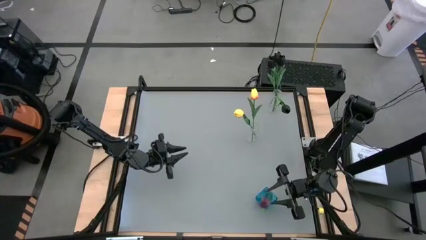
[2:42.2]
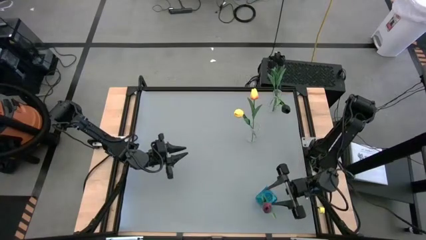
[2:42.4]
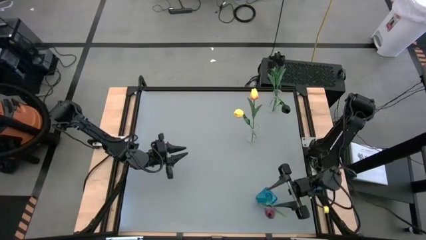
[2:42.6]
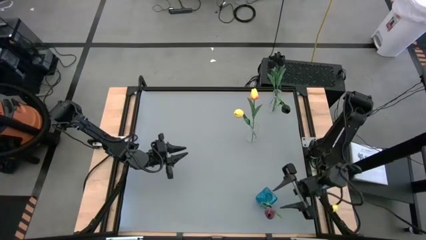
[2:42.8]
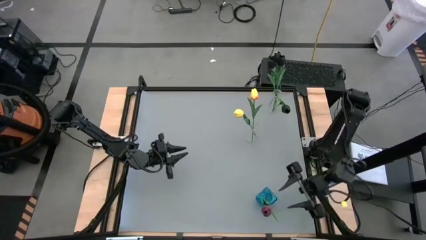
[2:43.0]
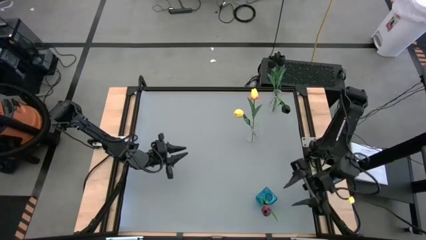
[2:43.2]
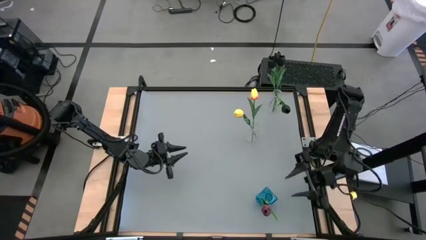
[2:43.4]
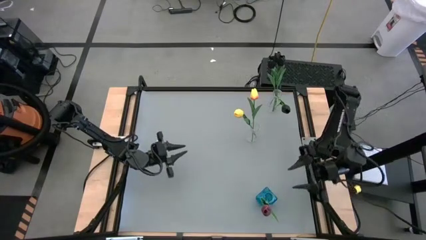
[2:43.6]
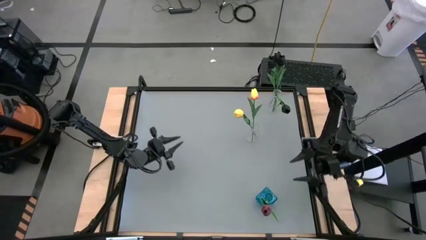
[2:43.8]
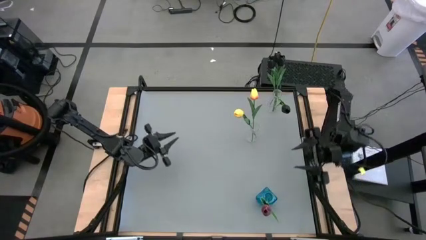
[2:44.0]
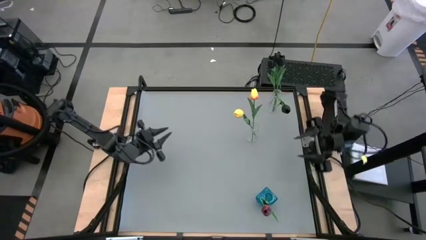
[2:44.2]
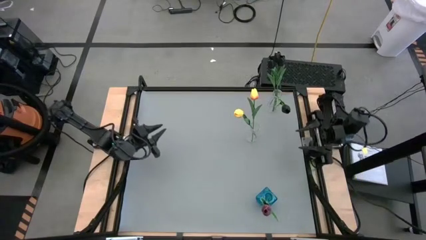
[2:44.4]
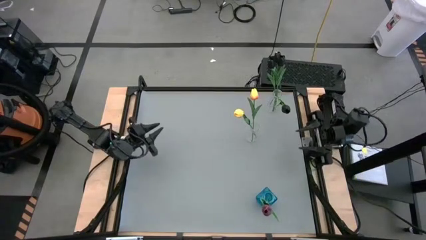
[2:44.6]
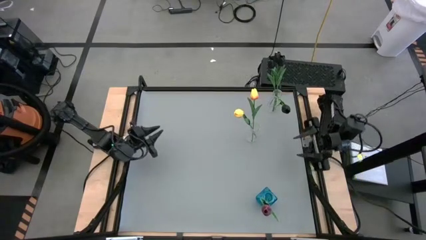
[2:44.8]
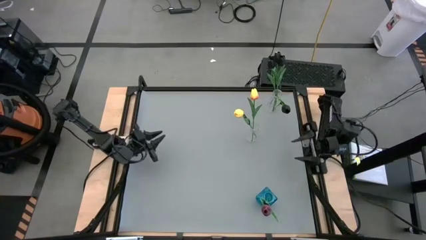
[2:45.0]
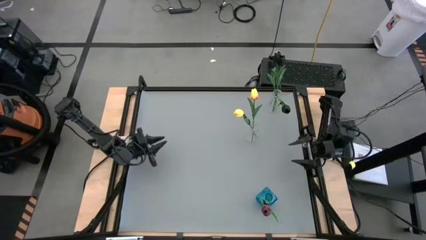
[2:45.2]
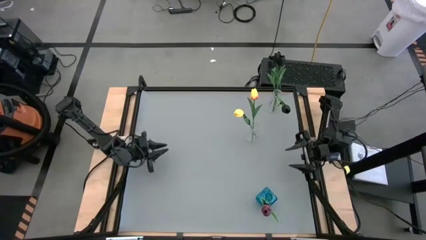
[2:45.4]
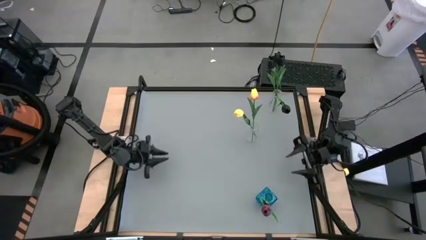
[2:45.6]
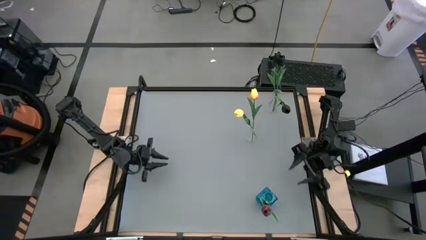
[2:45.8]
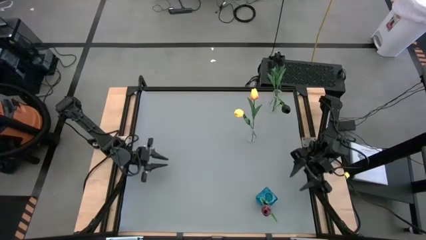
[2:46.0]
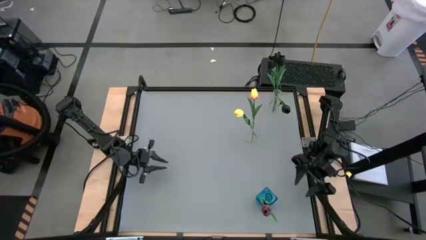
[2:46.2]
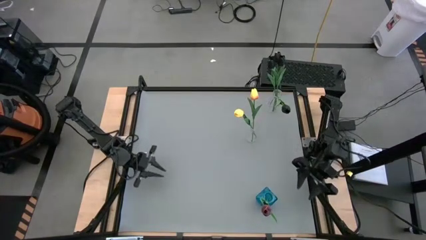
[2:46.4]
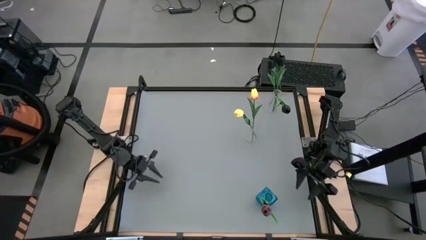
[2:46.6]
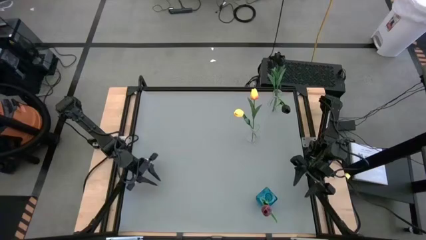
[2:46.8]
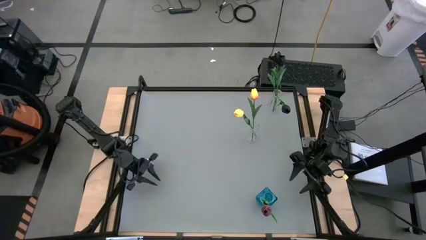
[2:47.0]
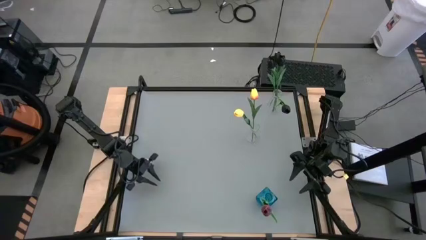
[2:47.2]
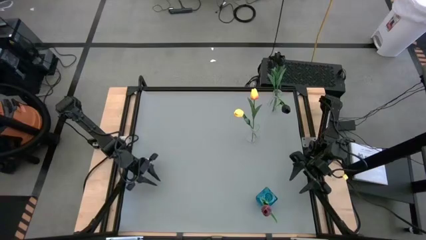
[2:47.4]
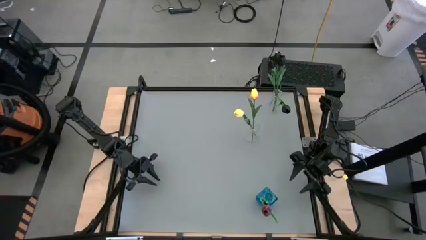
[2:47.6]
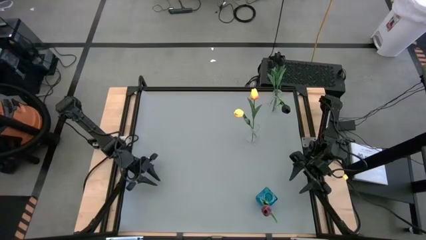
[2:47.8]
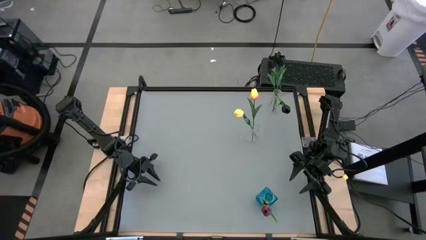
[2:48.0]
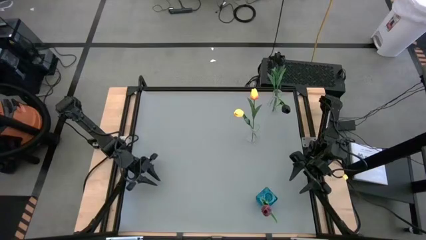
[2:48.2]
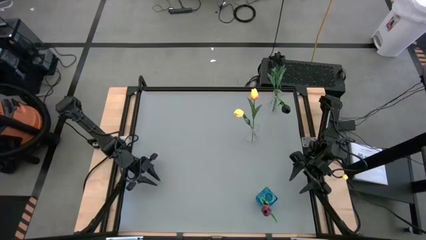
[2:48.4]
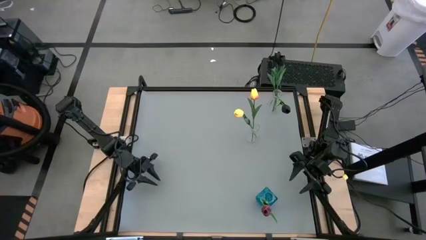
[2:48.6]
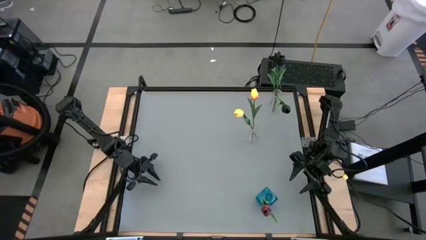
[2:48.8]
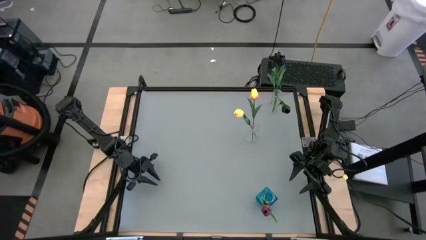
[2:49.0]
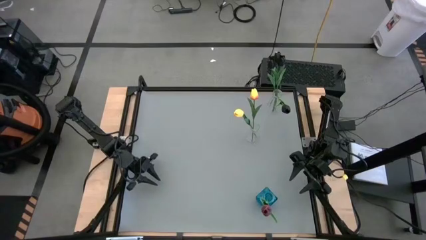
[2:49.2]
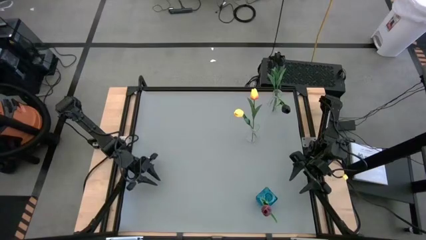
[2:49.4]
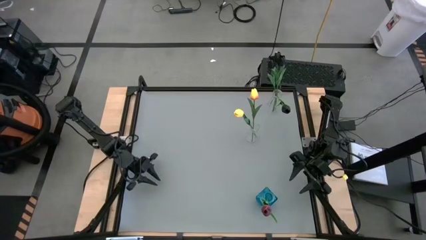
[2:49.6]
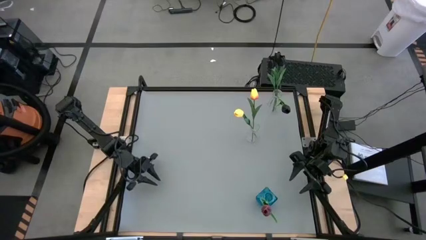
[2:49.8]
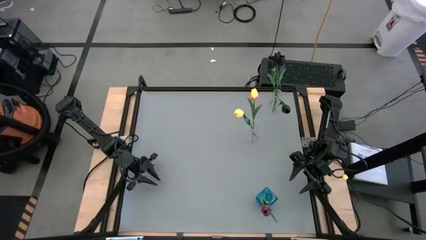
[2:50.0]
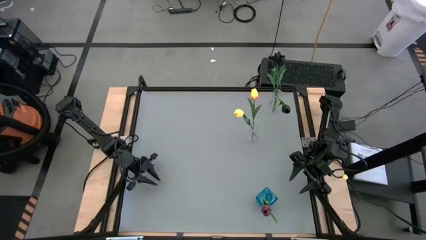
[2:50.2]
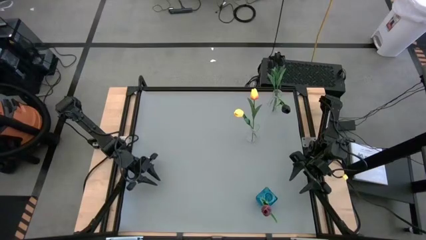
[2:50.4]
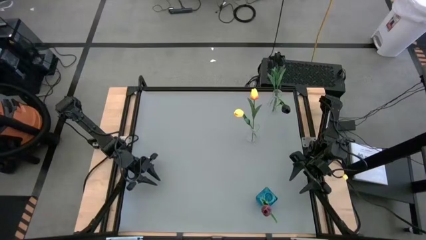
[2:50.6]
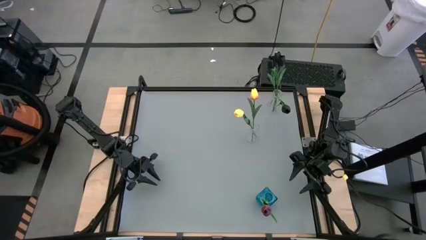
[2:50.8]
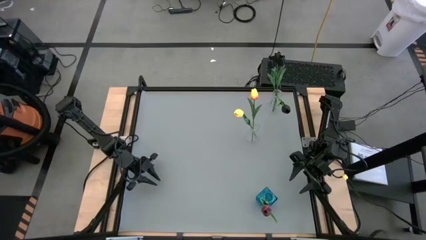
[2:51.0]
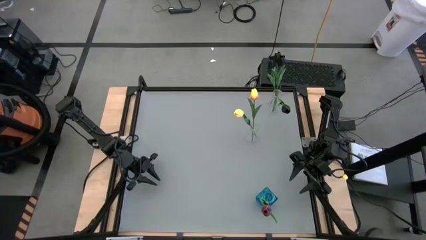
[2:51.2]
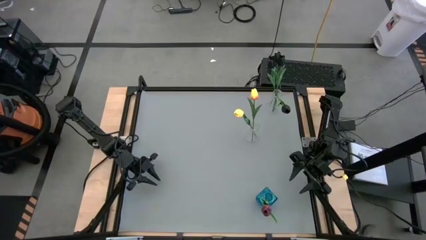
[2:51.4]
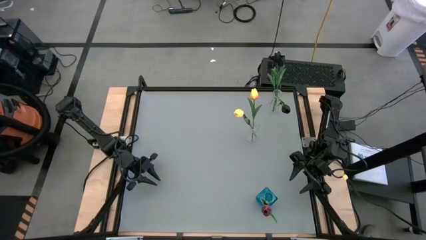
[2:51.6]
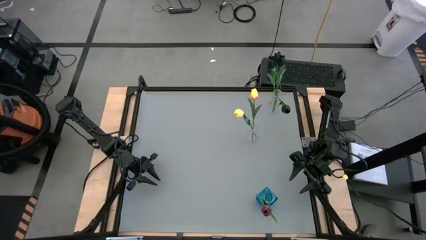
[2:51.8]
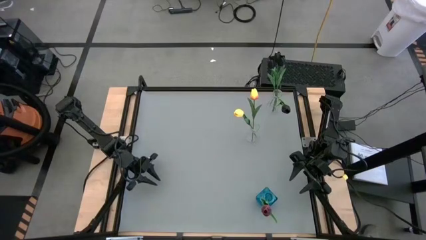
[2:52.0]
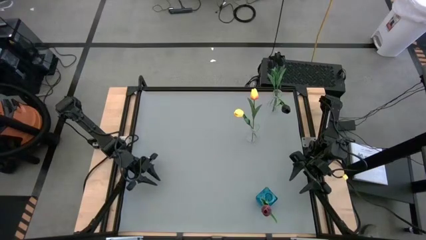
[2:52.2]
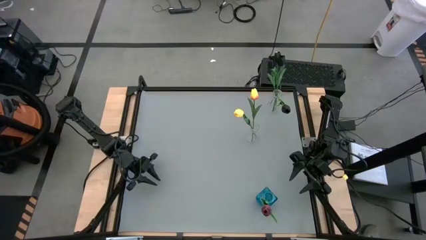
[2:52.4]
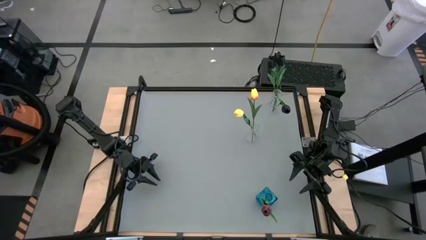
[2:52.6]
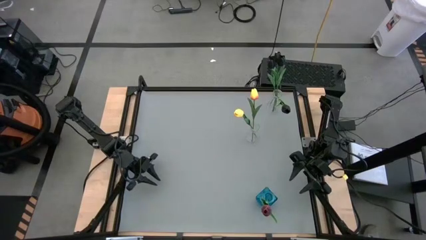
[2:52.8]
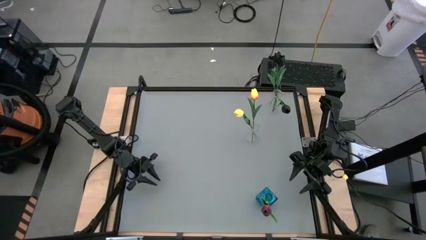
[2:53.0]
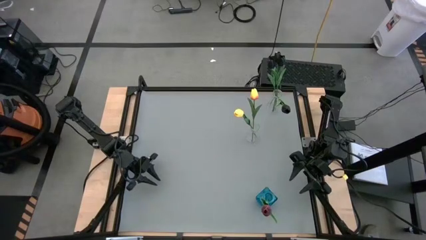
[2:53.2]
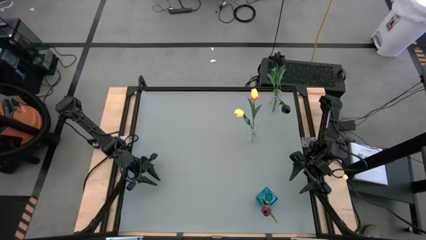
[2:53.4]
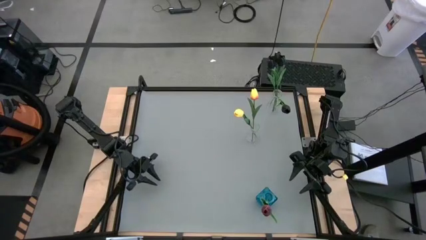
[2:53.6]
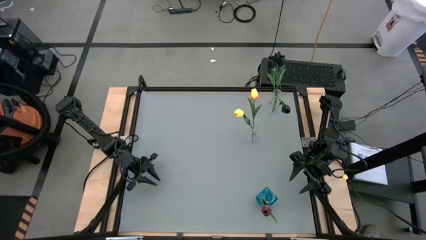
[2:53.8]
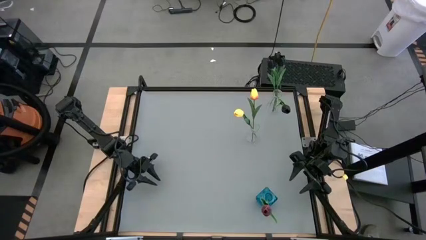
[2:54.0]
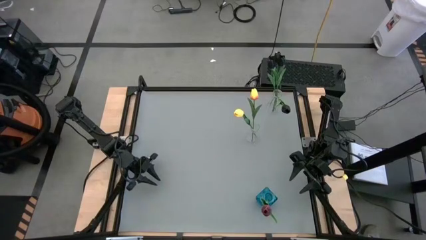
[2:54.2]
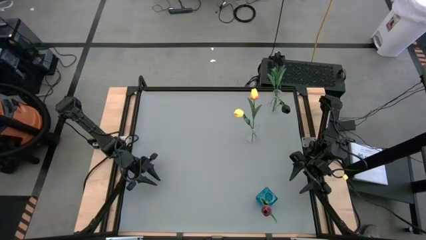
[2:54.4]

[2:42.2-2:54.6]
Task: Sort flowers into vase by color
Return to Home Position

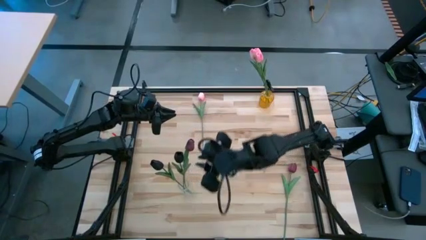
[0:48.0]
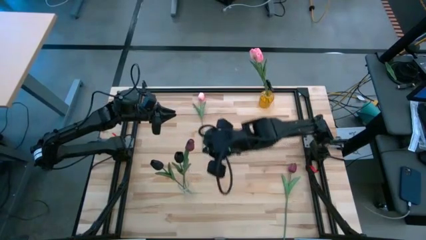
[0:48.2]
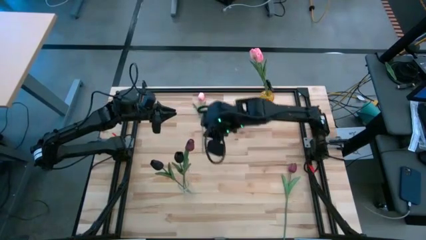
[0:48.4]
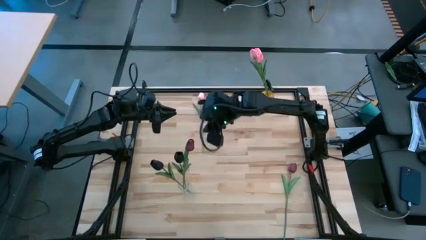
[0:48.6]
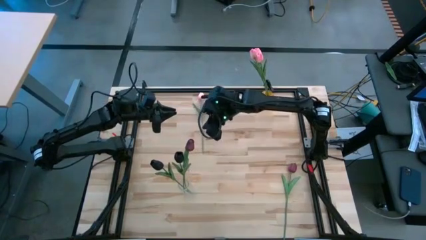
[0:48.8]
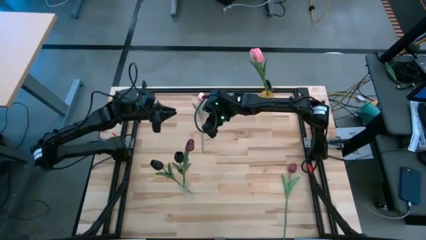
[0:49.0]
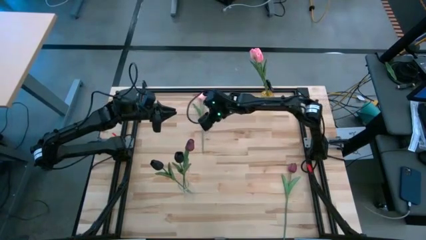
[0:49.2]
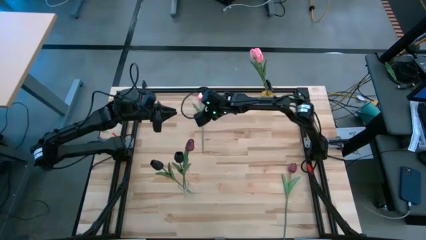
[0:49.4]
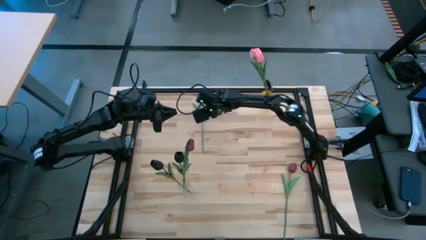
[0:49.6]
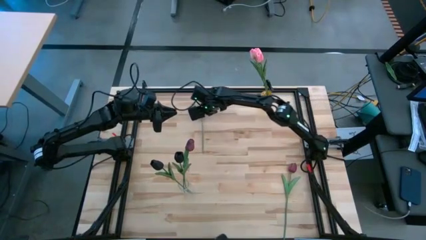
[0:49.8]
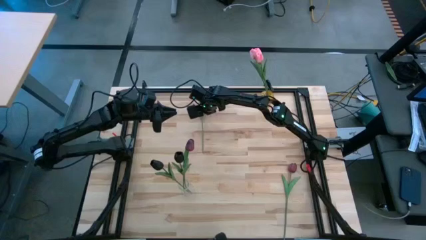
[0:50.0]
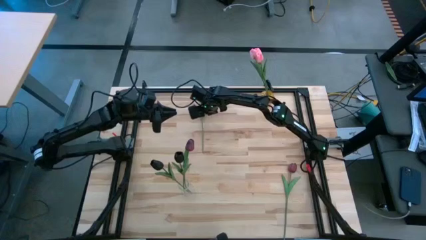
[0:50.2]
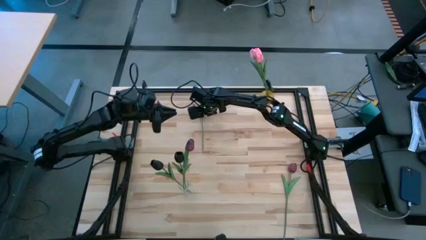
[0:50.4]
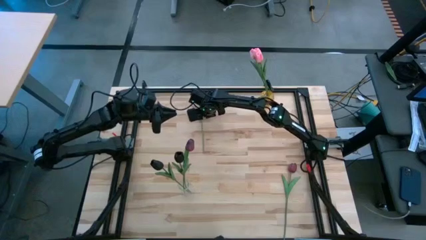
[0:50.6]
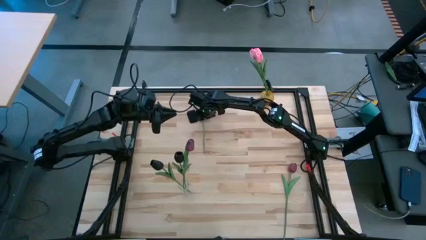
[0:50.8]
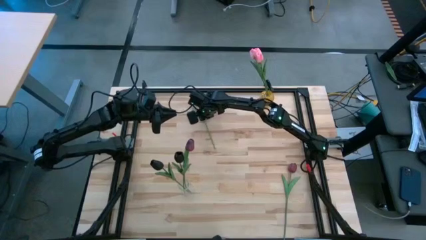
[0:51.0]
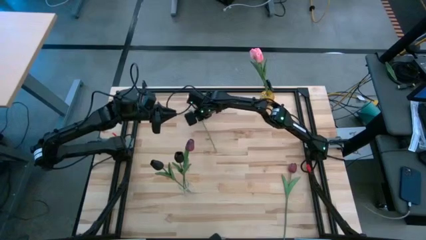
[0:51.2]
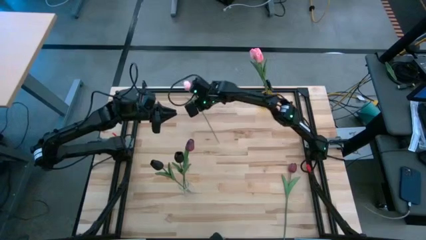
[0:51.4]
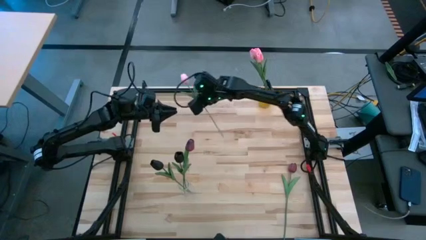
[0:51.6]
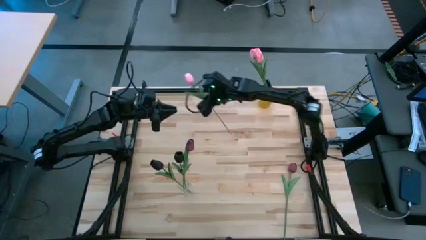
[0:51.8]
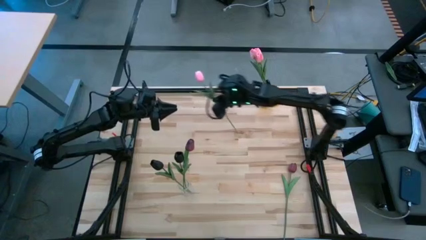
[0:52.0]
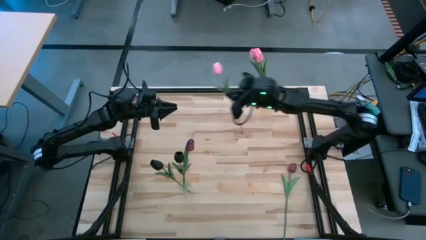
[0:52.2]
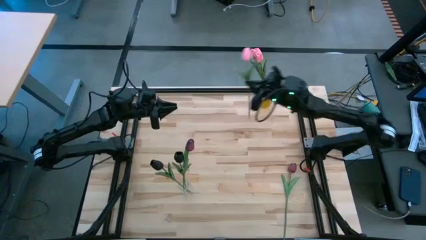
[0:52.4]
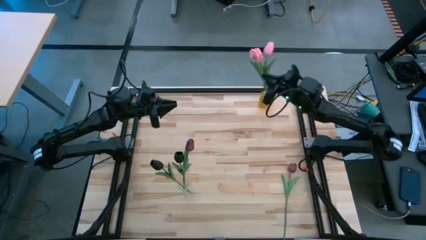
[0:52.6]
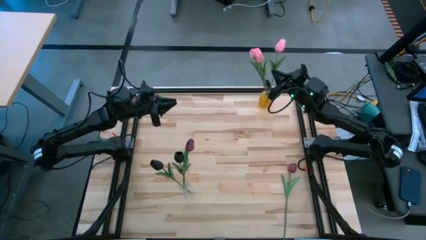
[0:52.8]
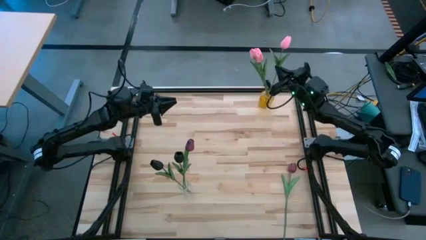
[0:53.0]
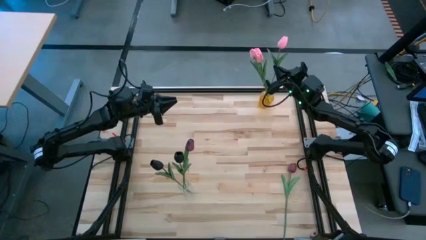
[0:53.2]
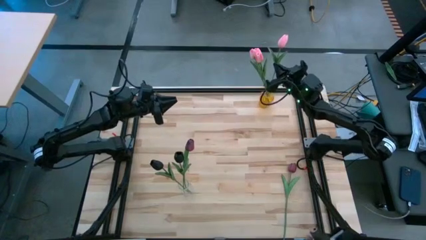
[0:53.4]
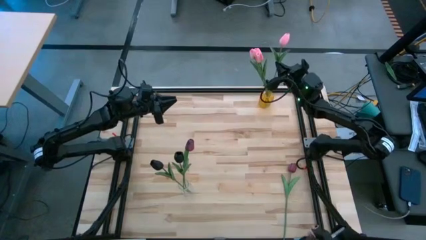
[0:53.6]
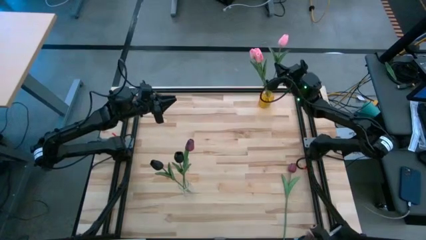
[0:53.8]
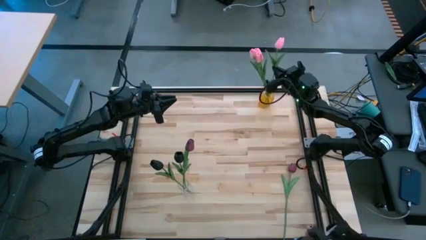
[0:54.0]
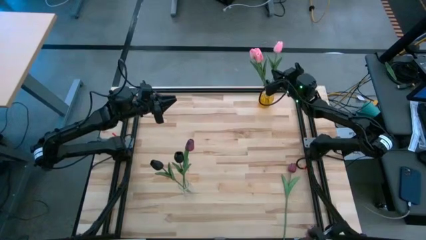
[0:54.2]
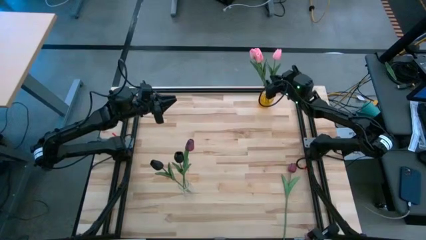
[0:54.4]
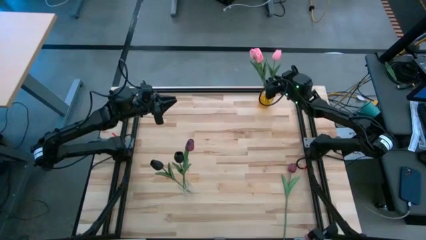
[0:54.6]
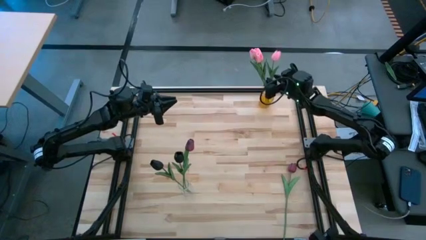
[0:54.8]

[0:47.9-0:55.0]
Task: Sort flowers into vase by color
Put the pink tulip flower into the yellow crystal vase
